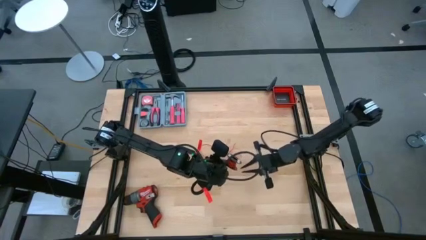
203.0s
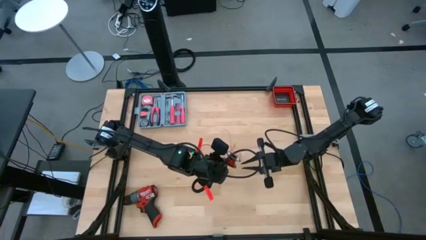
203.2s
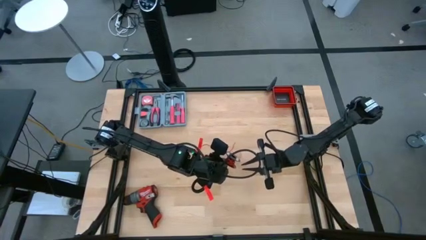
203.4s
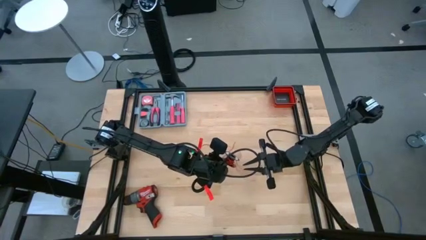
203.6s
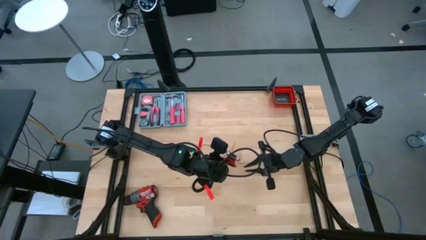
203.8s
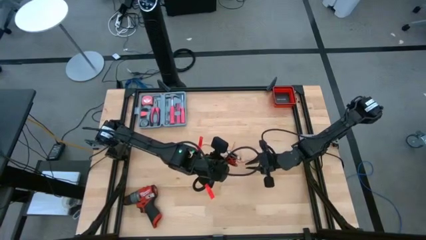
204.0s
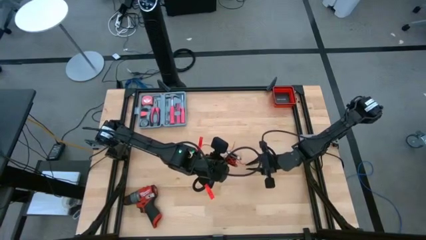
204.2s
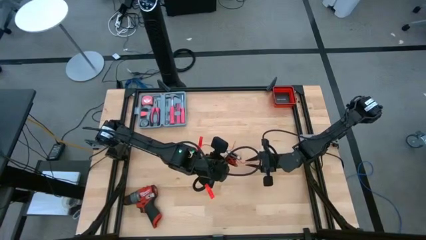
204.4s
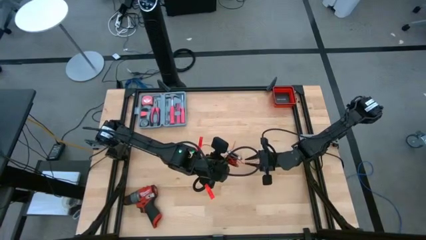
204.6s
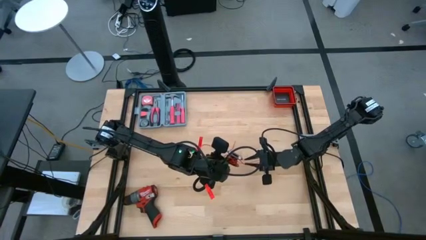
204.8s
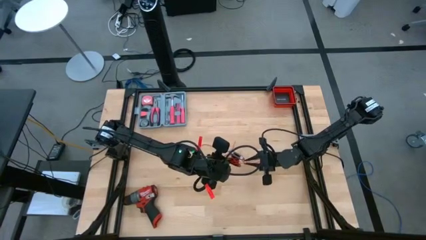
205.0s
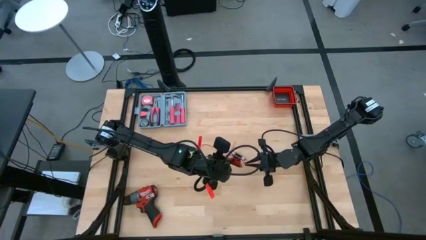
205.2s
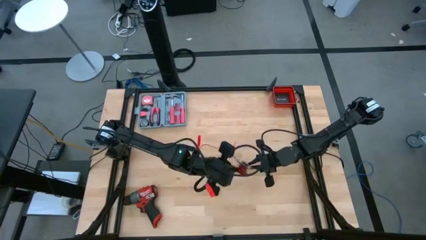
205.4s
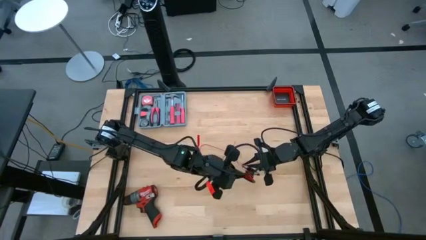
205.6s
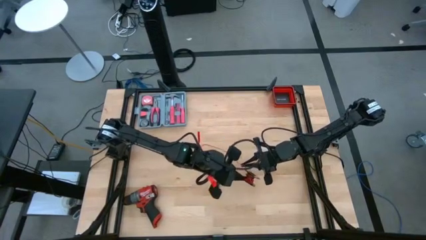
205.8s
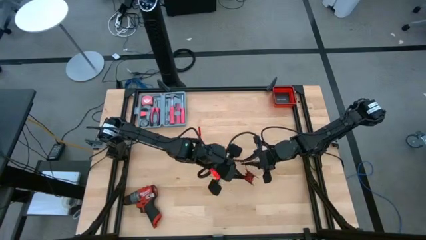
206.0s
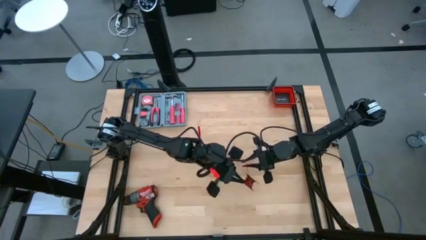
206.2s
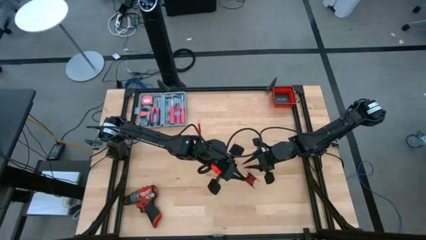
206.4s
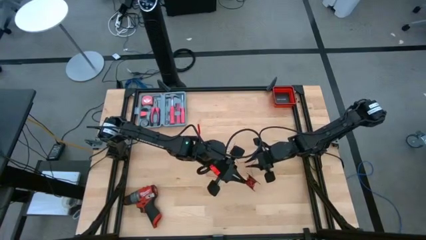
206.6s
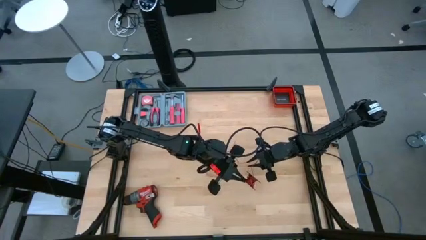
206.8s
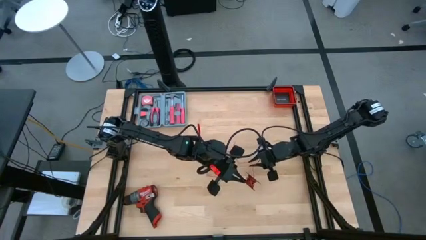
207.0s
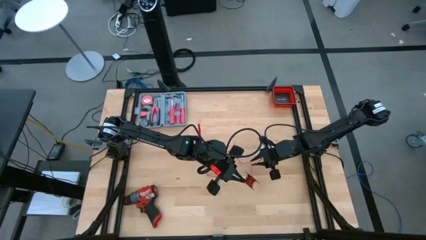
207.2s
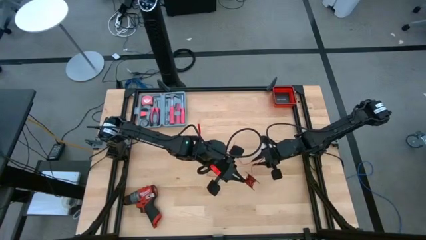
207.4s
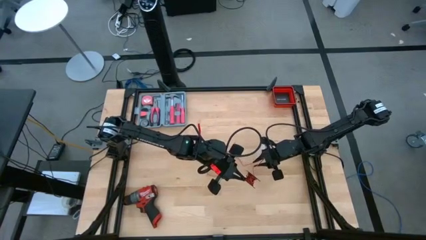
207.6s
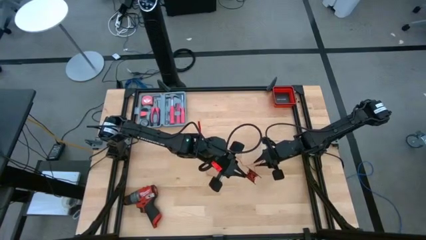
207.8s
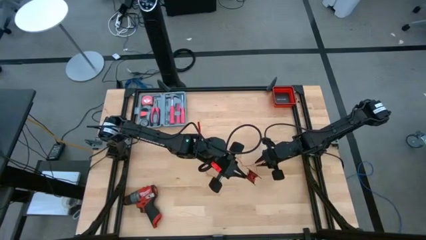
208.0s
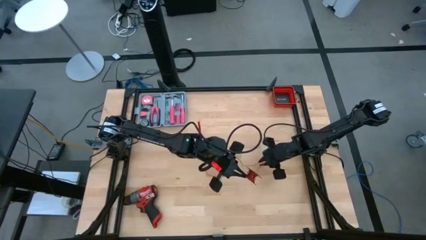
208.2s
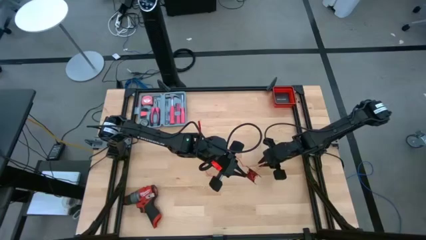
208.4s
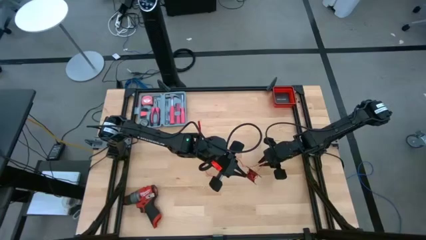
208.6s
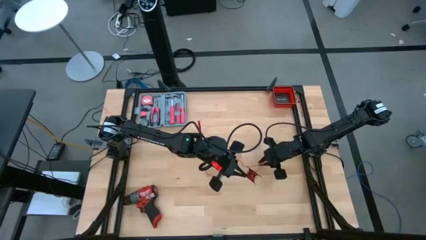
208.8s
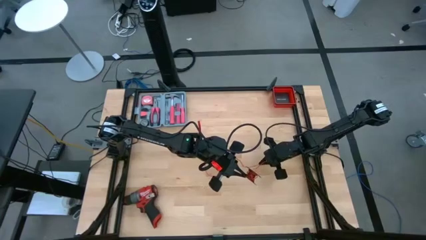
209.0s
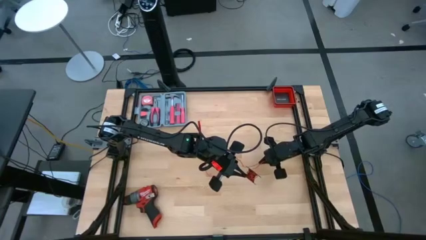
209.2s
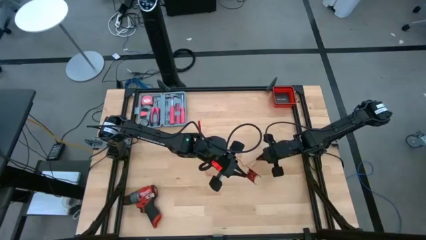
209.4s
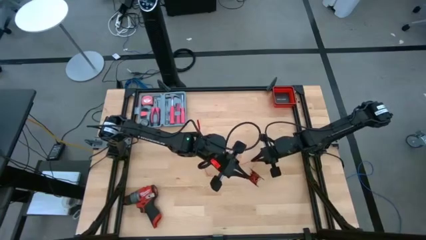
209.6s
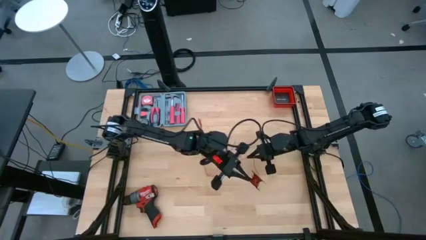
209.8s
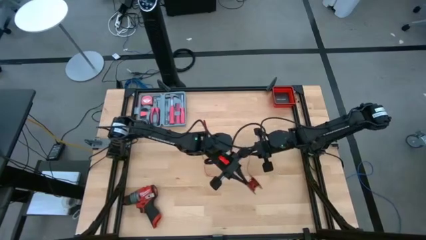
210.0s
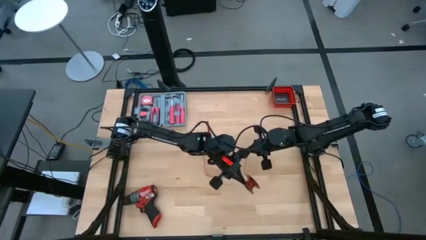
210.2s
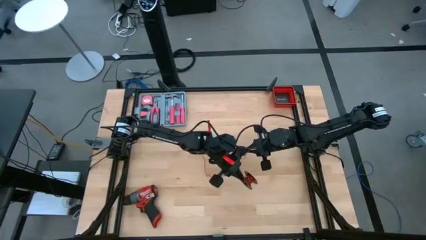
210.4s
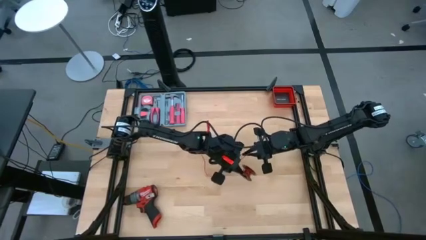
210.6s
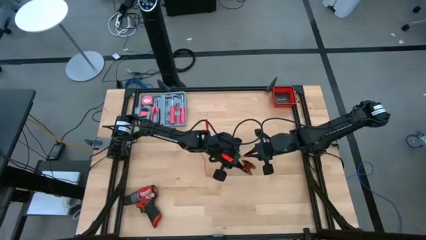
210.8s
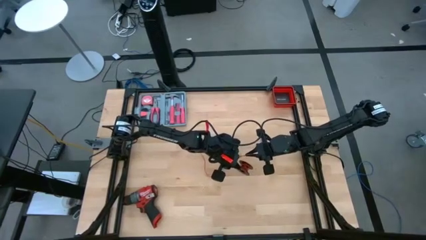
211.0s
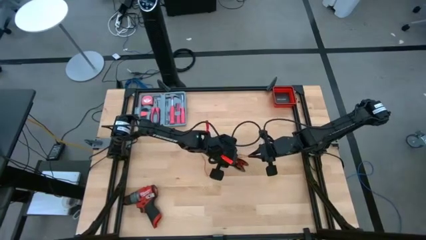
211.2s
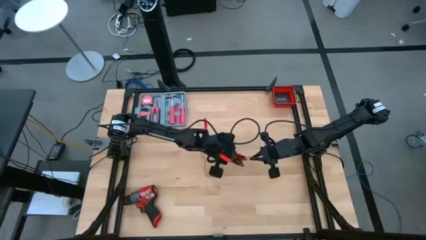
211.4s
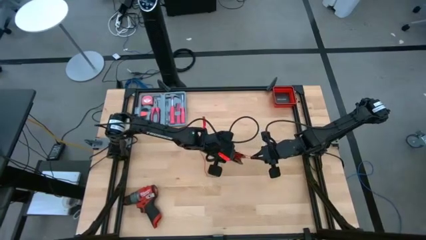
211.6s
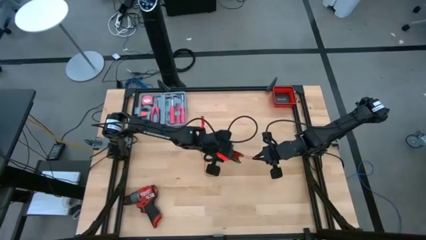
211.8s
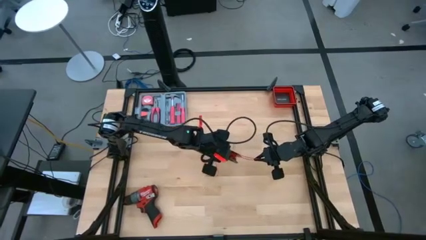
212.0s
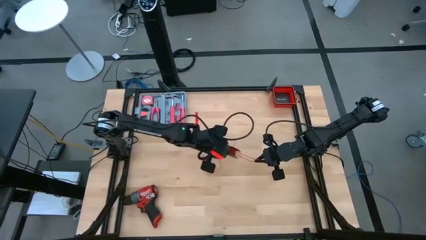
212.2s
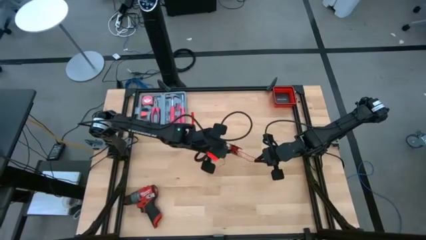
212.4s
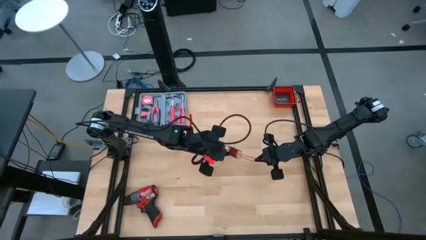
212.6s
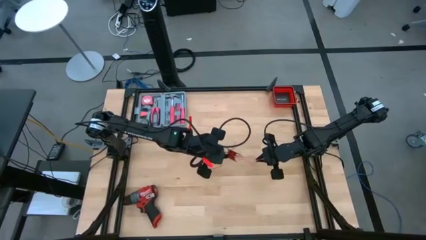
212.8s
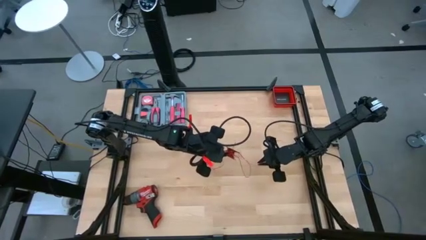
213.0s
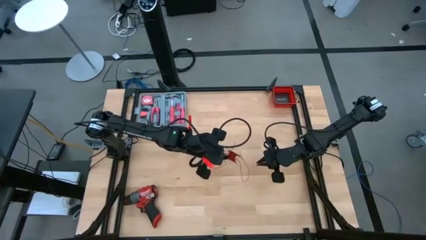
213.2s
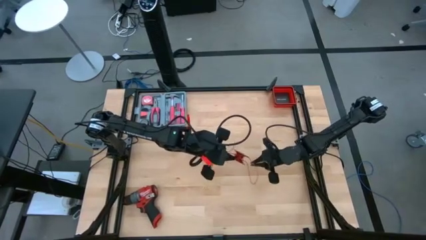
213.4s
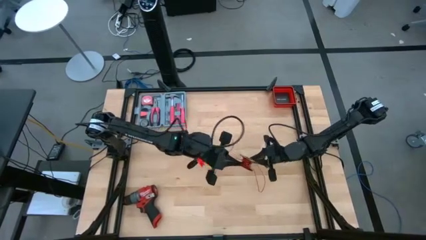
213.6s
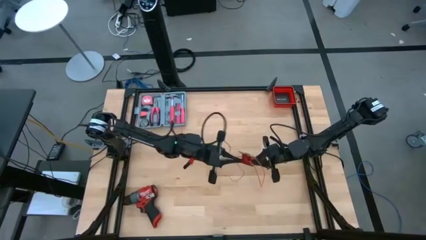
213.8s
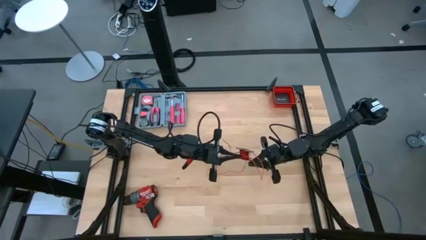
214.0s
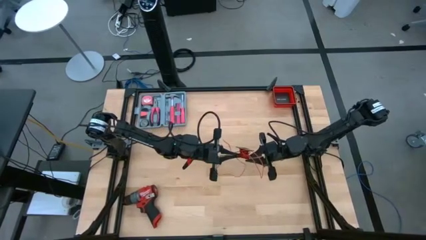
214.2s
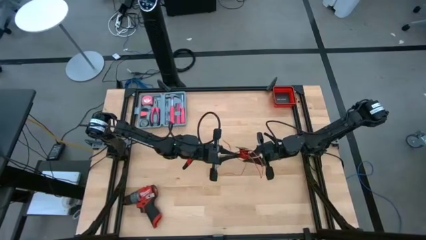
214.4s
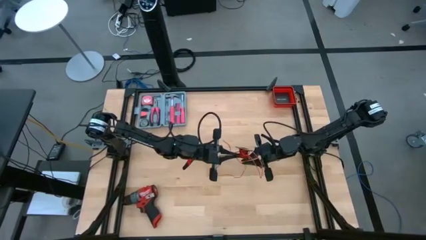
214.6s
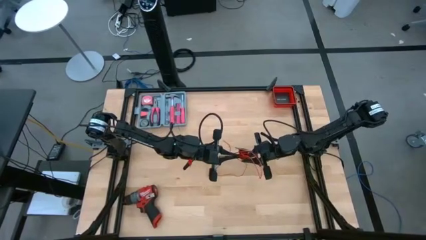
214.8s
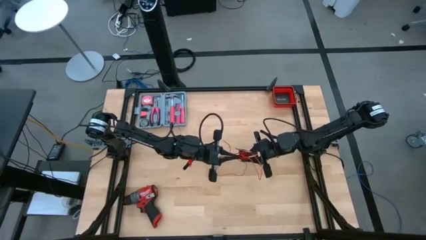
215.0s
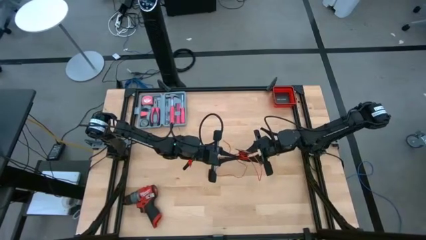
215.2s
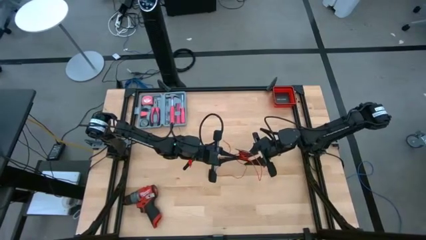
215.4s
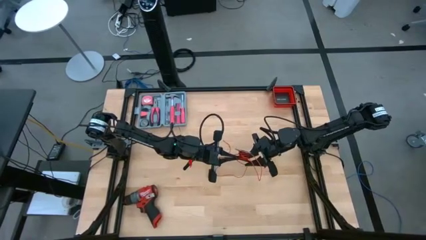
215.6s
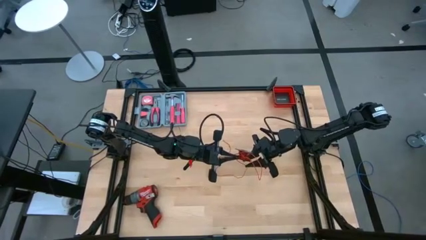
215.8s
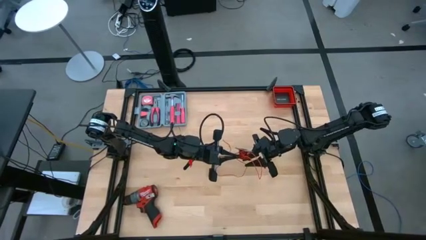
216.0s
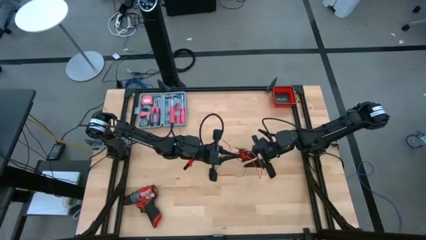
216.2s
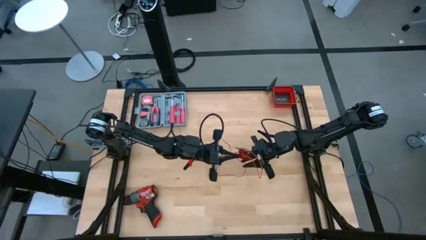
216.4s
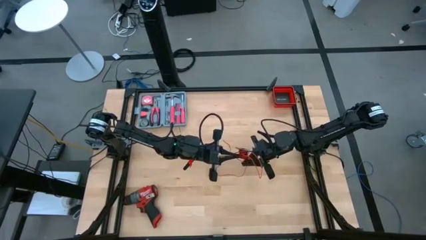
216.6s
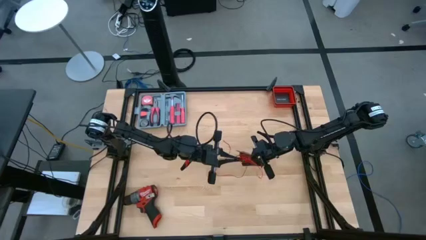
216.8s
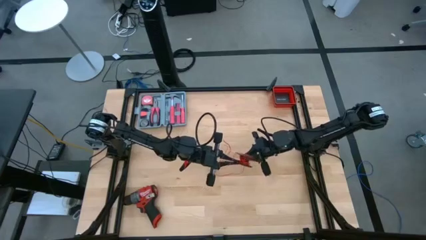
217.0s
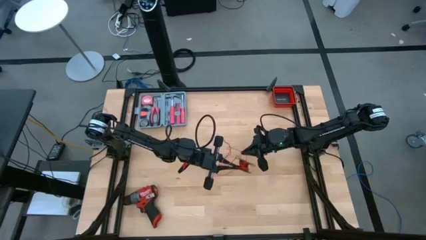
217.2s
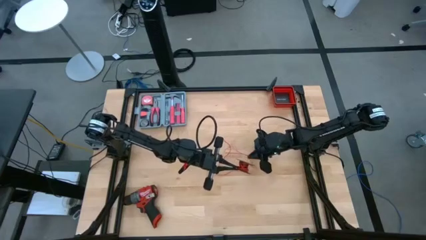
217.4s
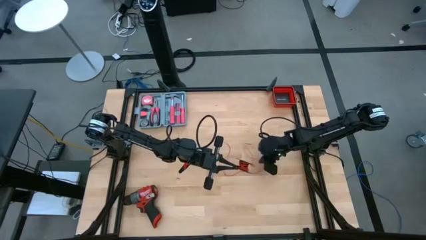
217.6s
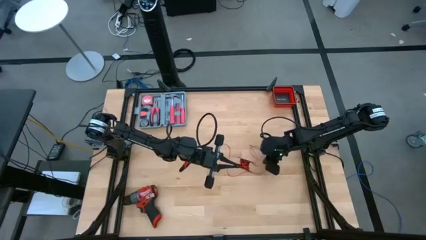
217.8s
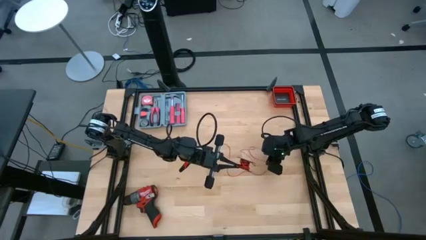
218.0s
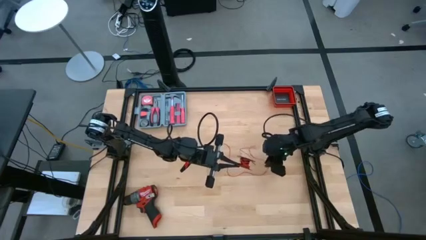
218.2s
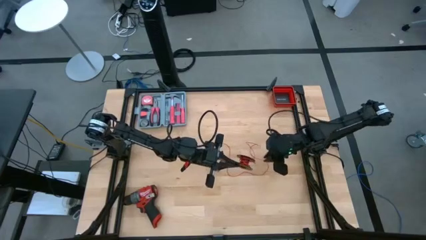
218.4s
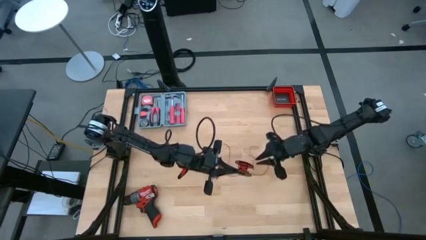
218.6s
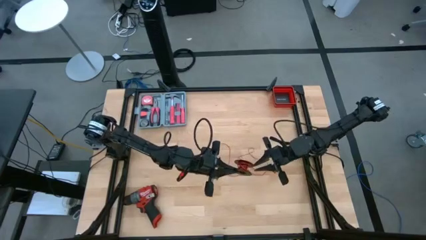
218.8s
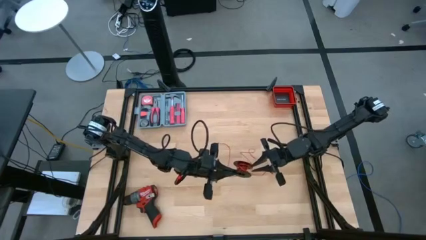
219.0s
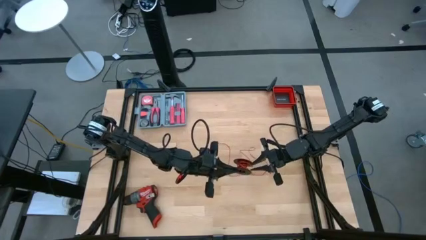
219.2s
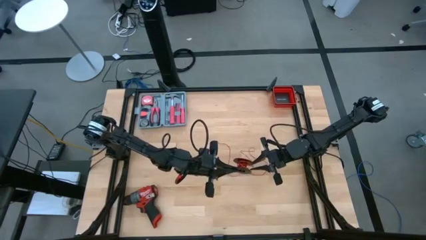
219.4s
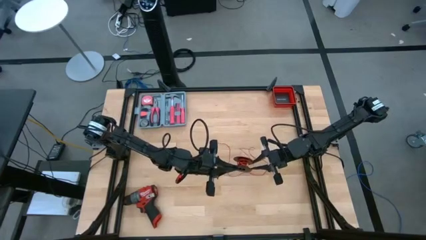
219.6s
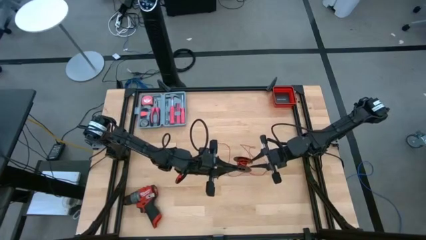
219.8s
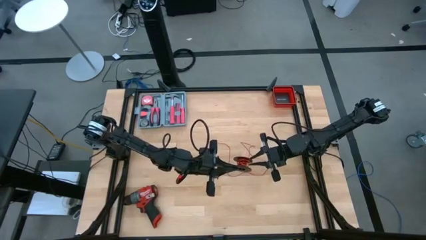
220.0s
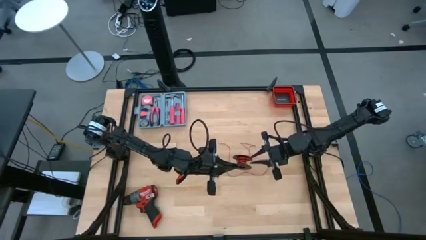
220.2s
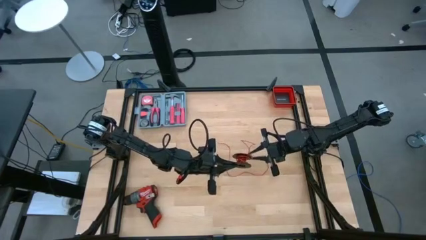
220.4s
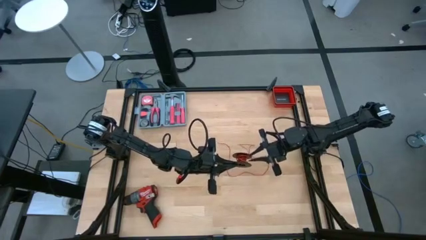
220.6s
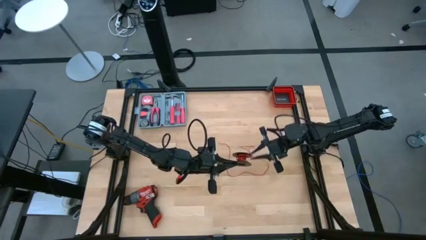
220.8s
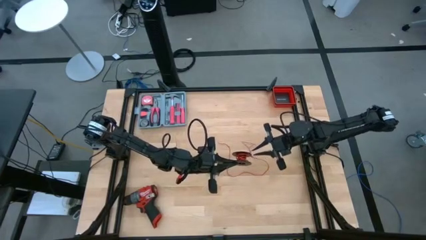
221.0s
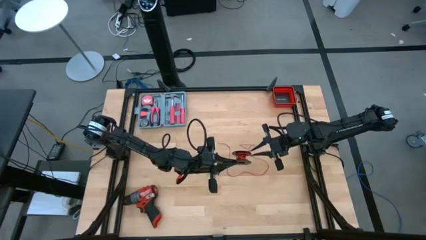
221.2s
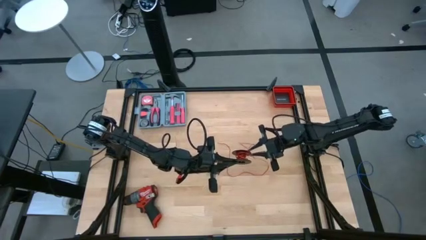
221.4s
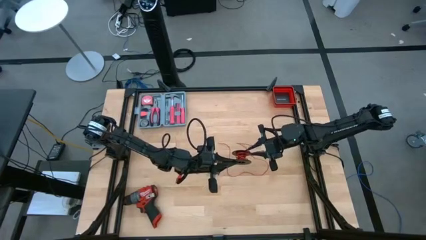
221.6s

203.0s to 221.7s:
Task: Coil cords
Coil the red wire on the black spool
